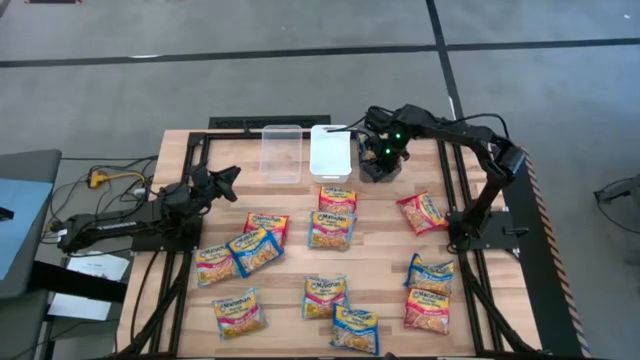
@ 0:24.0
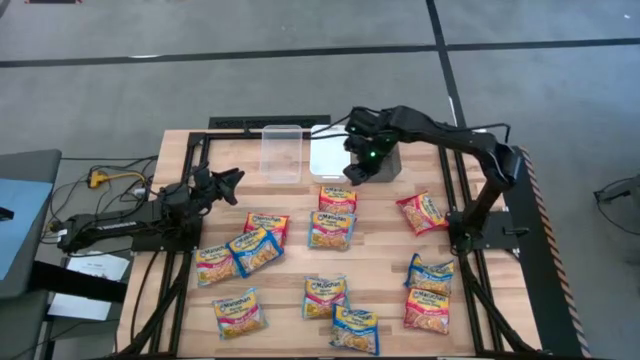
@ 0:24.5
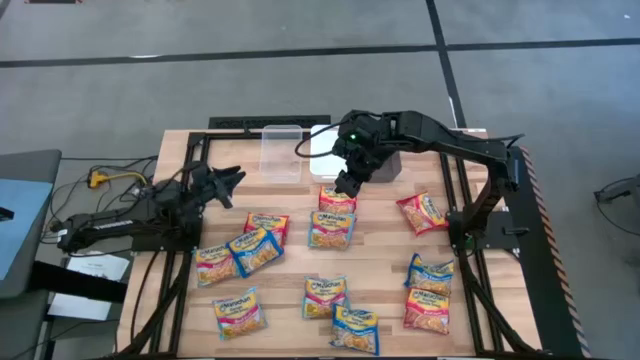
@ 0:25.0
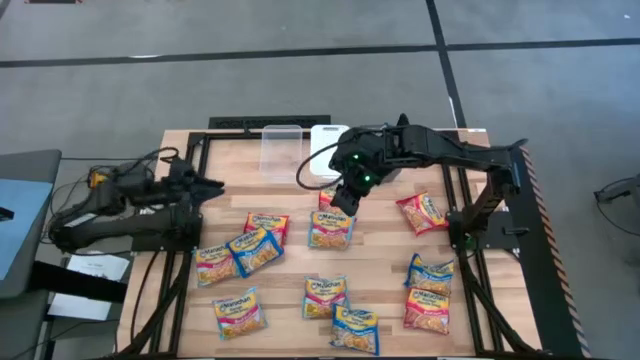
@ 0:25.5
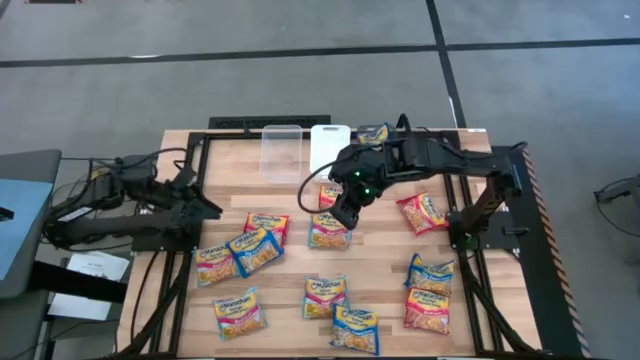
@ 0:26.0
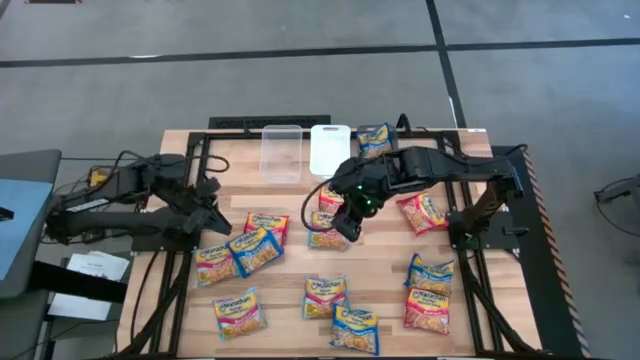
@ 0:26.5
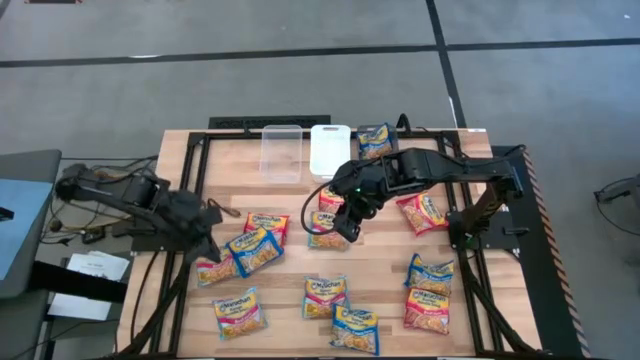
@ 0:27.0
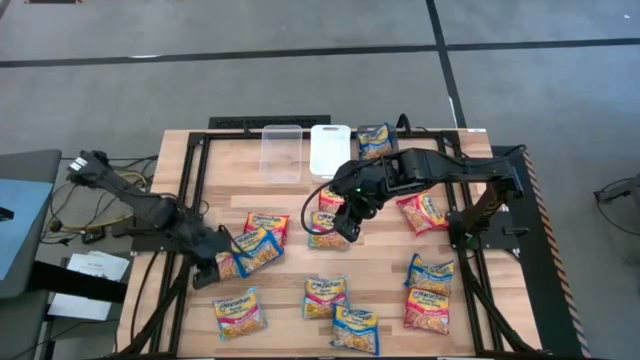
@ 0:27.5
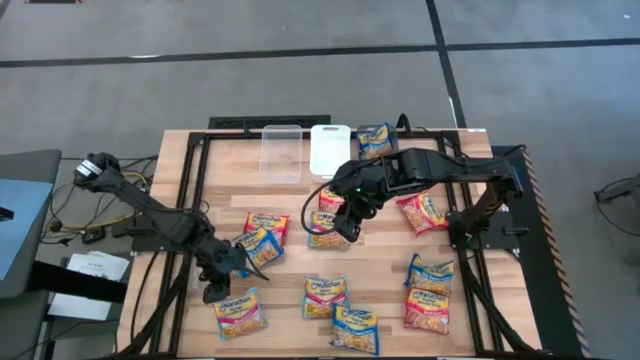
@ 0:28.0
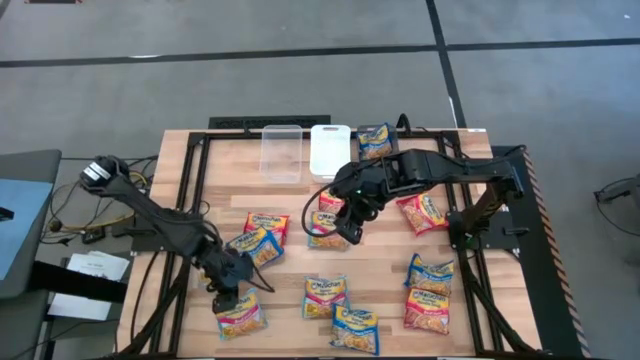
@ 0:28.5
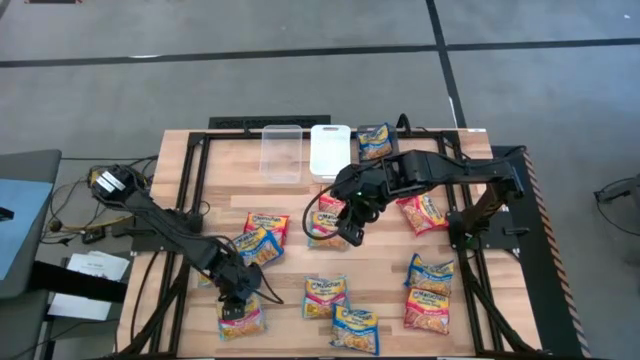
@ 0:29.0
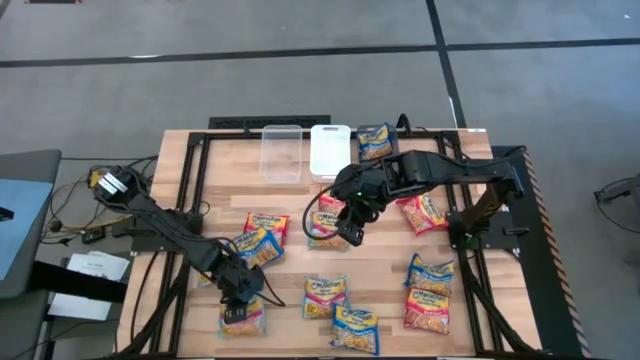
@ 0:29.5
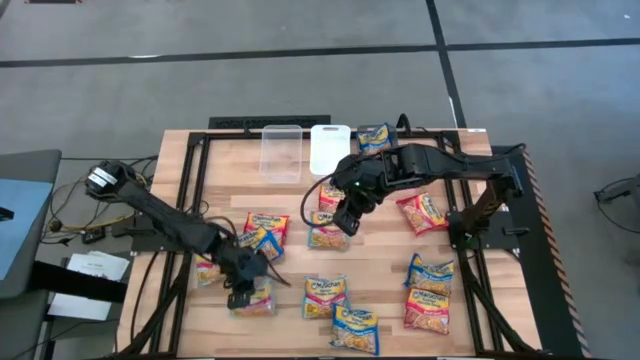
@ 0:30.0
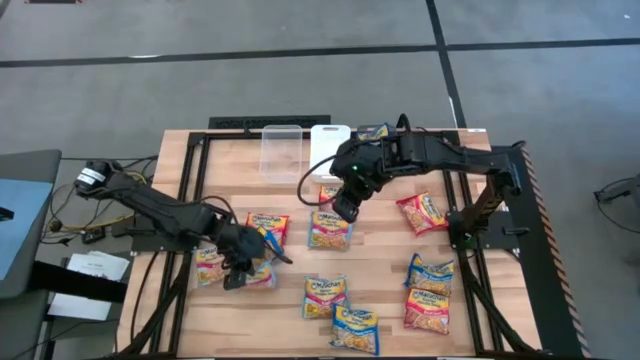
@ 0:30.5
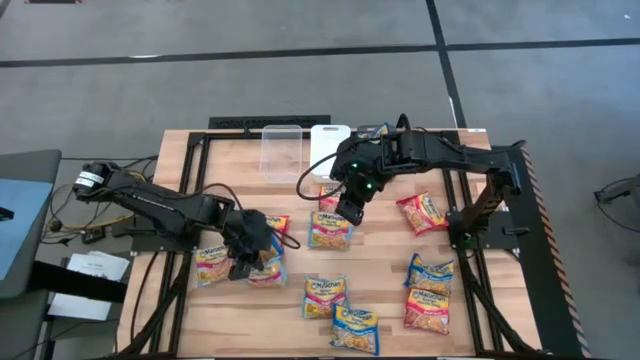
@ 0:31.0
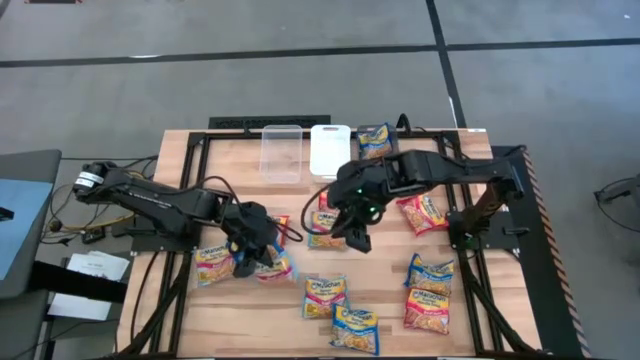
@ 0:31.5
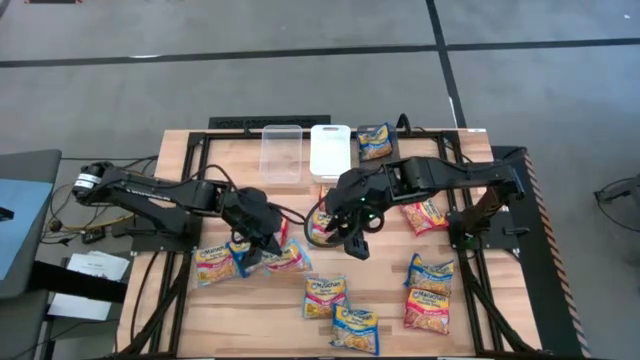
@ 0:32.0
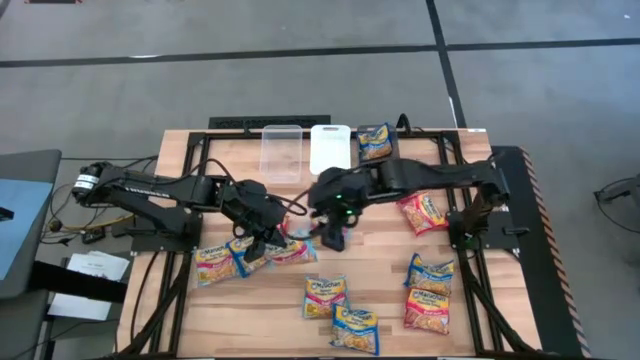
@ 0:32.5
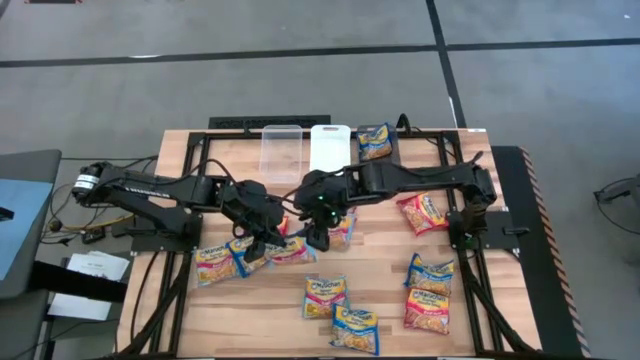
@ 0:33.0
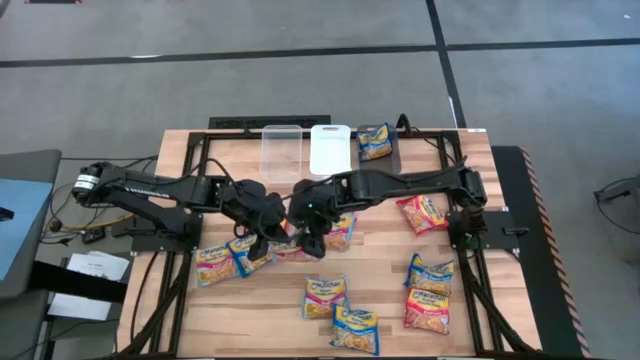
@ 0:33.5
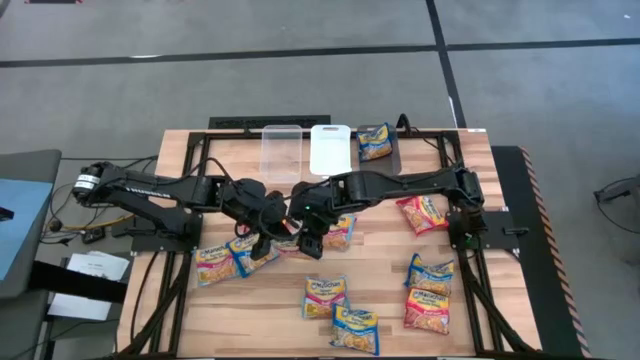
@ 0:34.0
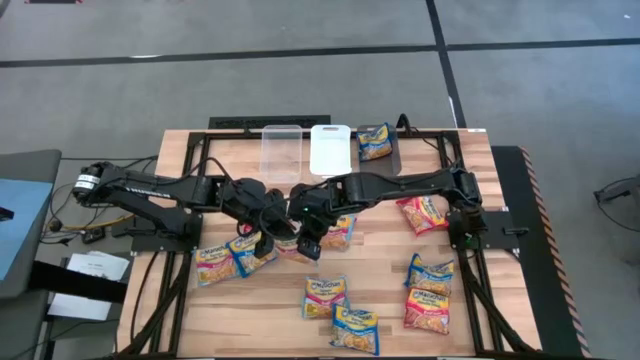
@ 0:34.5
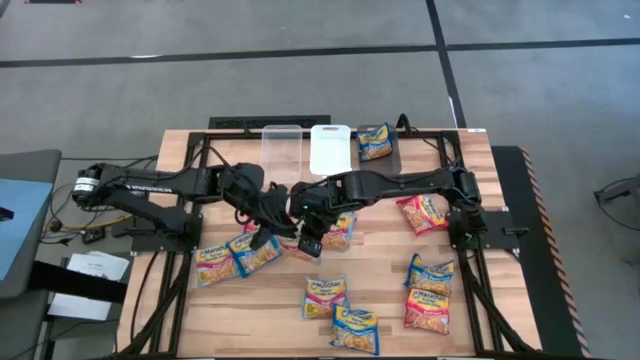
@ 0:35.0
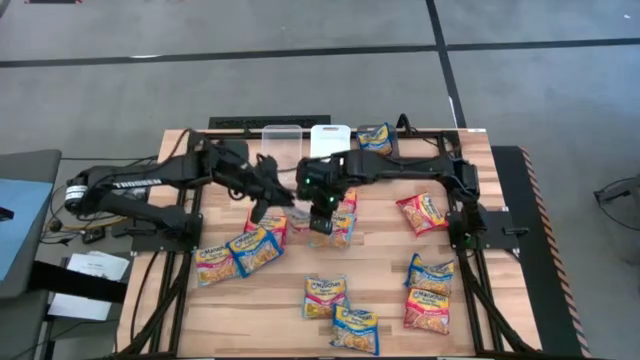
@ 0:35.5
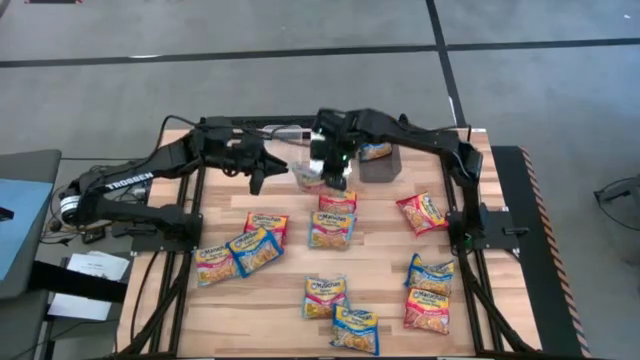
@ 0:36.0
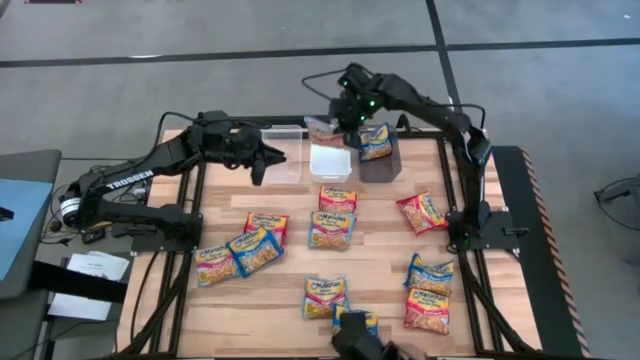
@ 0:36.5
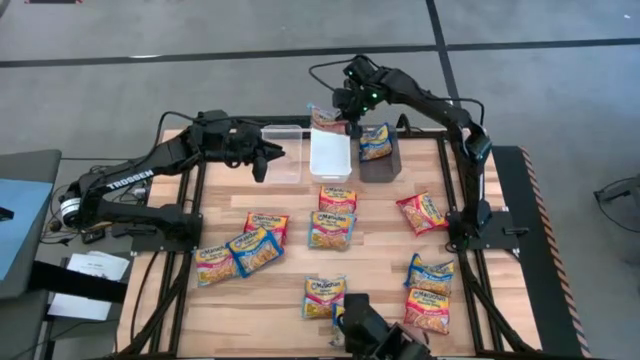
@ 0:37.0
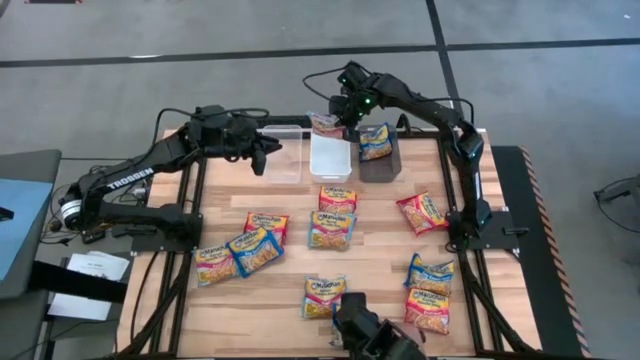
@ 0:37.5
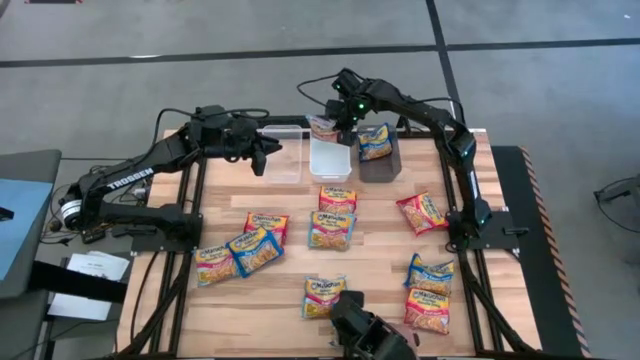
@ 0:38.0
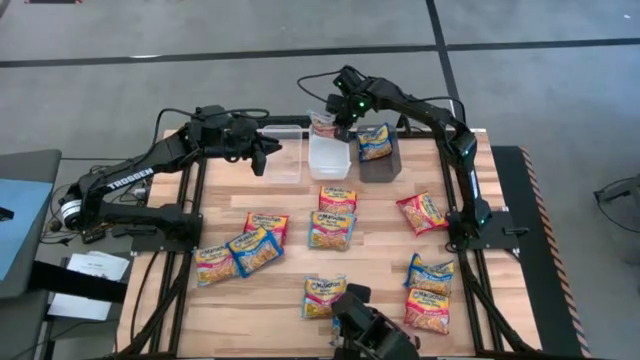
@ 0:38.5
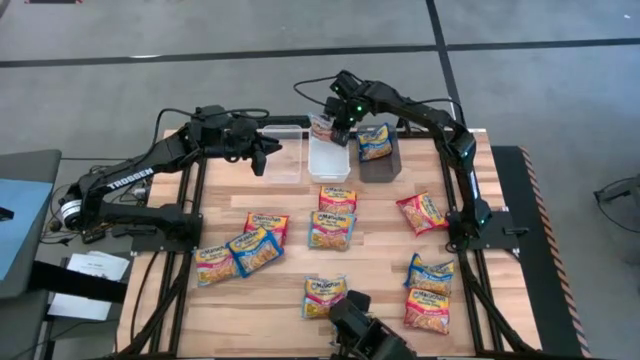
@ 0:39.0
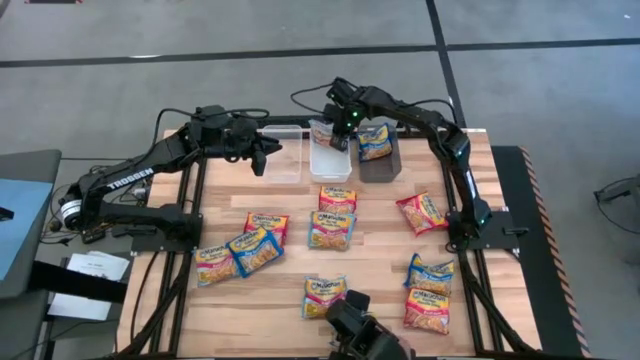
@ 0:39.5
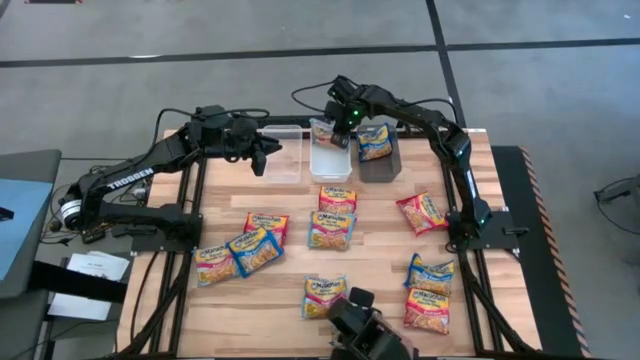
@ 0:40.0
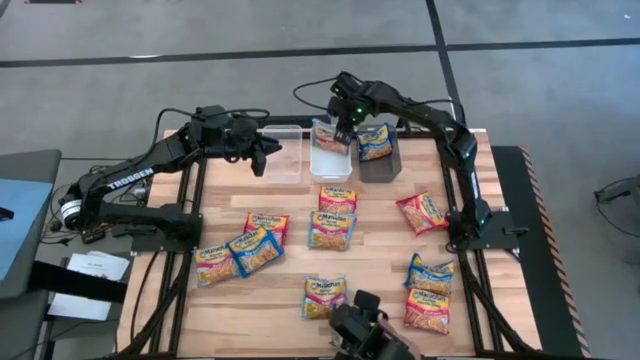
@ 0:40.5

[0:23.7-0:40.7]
Task: Sort Maruchan noodles
Put the light blue noodle pack into the white bin

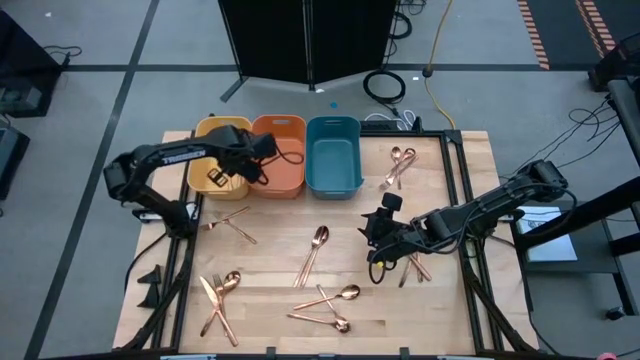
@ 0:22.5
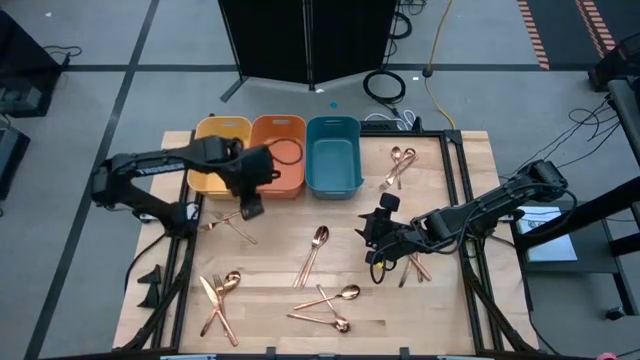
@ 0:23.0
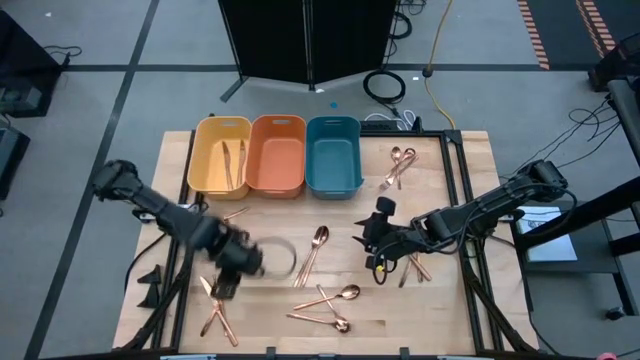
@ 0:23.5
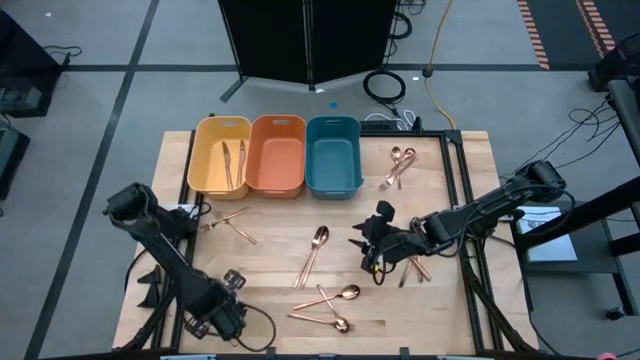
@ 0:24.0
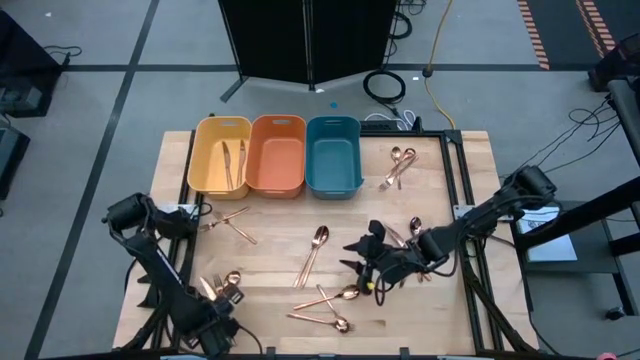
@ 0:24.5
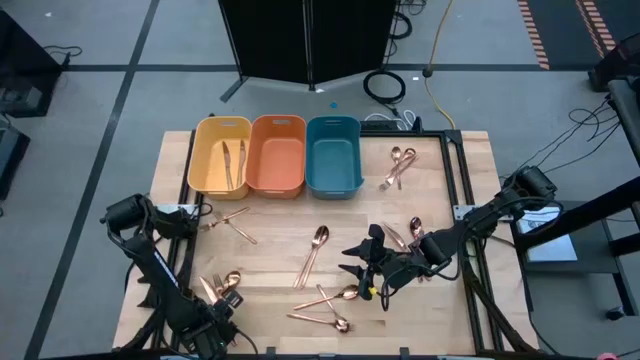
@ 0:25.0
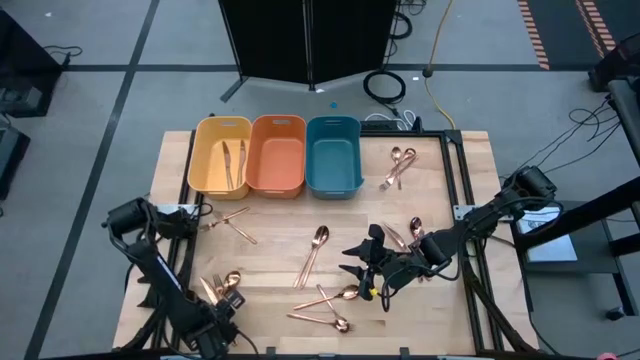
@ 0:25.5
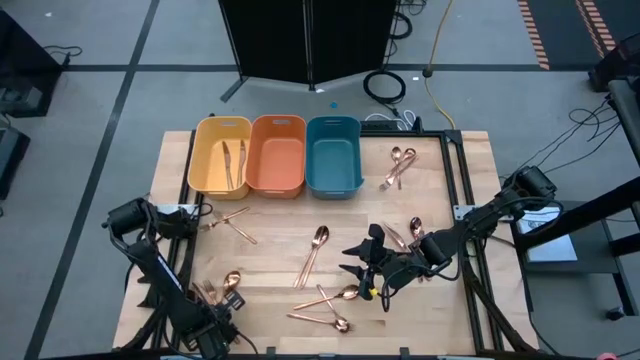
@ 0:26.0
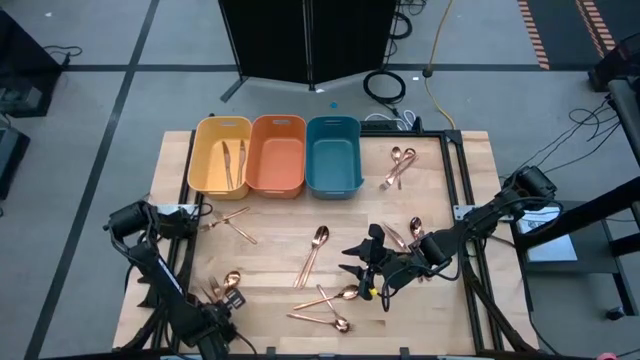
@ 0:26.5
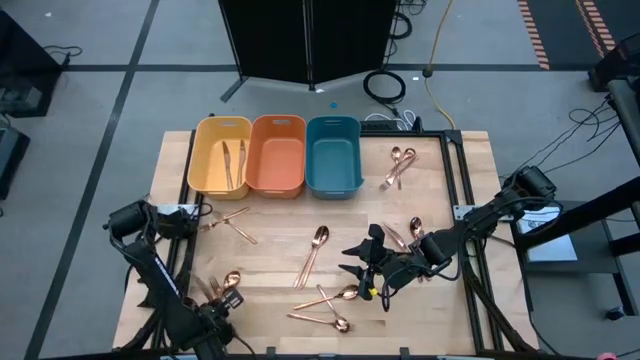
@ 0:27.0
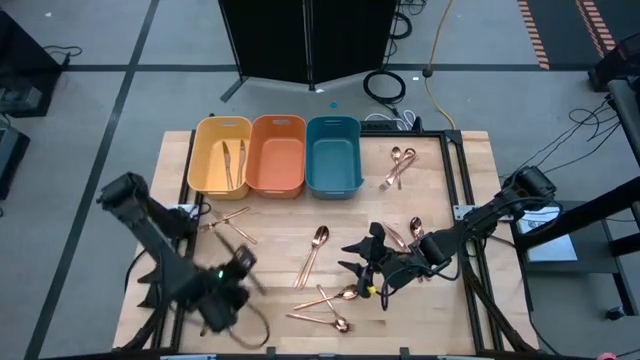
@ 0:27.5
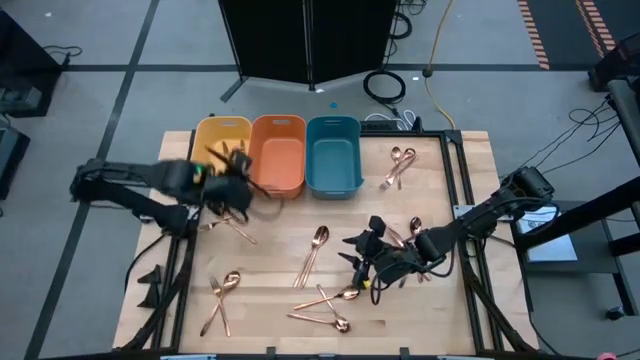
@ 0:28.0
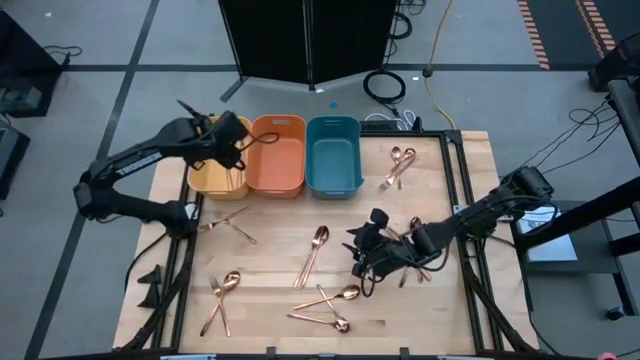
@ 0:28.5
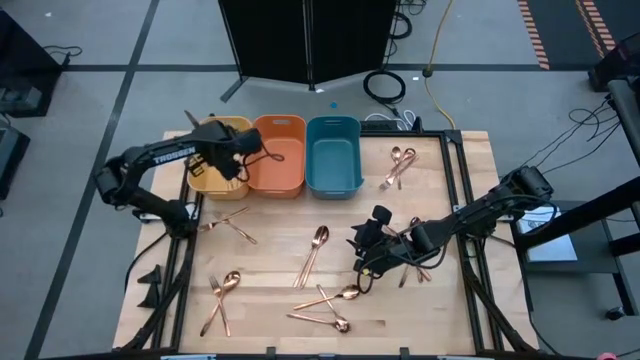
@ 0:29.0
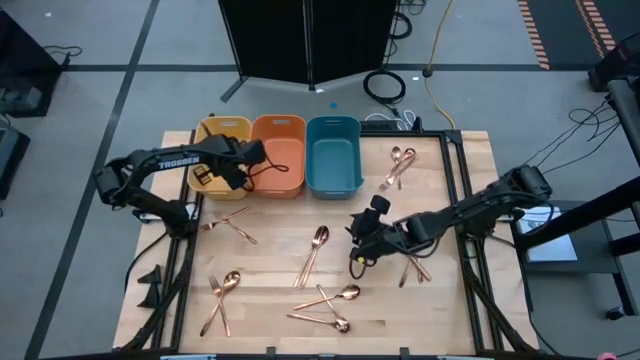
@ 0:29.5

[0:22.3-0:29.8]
Task: Sort silverware
Put the gold table knife into the yellow bin
